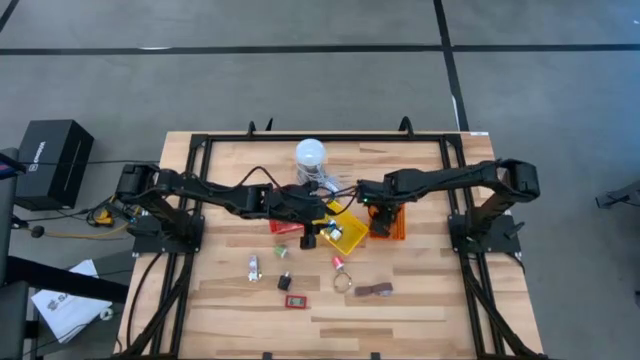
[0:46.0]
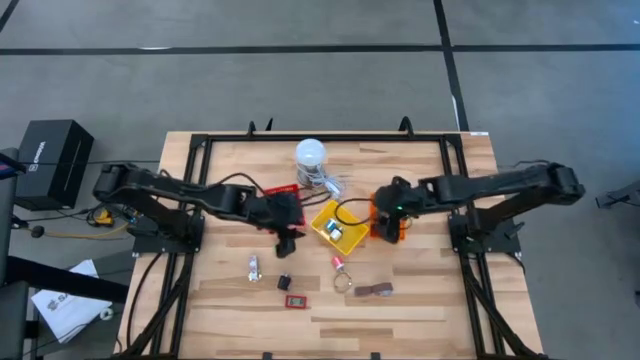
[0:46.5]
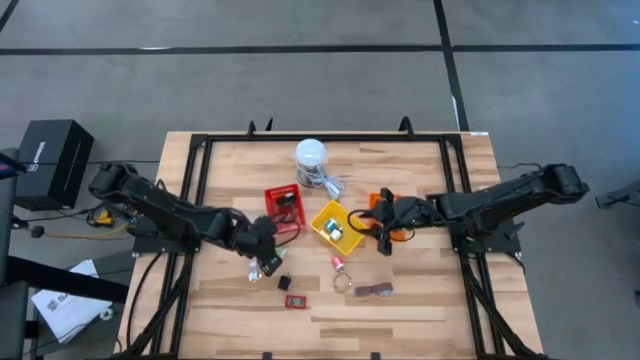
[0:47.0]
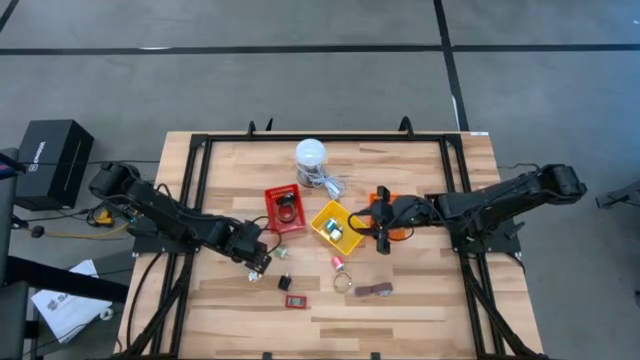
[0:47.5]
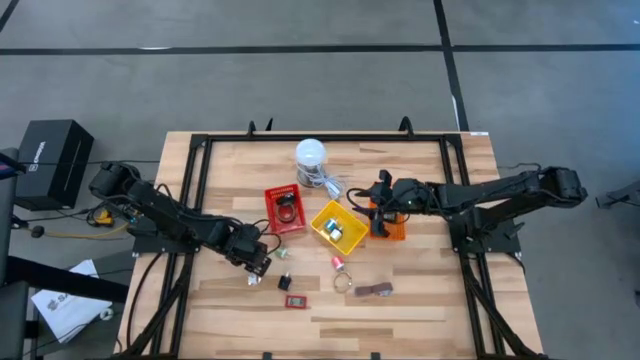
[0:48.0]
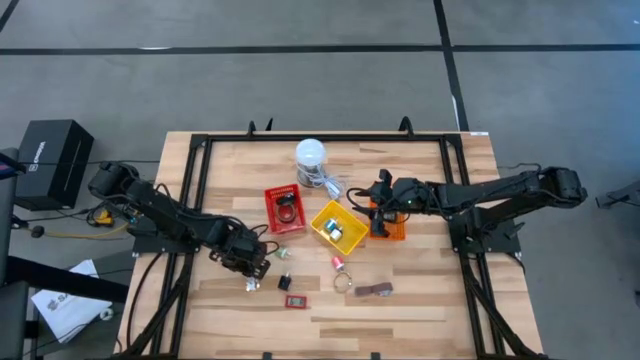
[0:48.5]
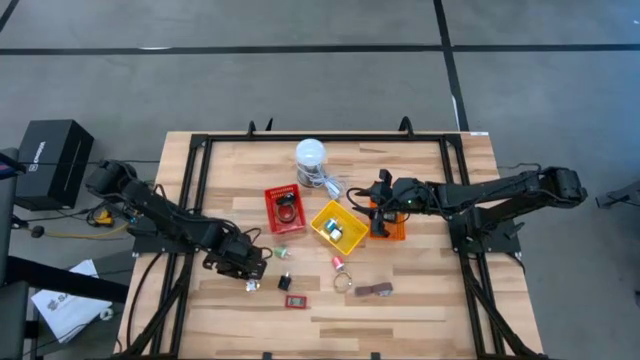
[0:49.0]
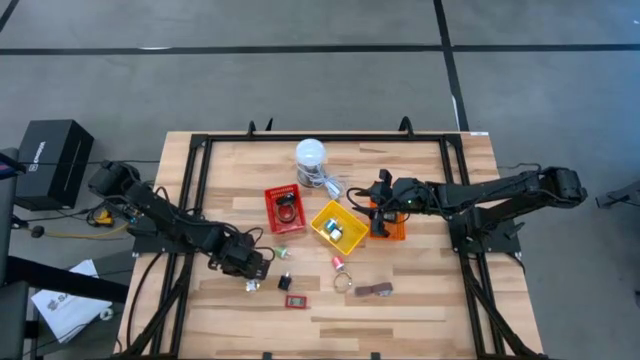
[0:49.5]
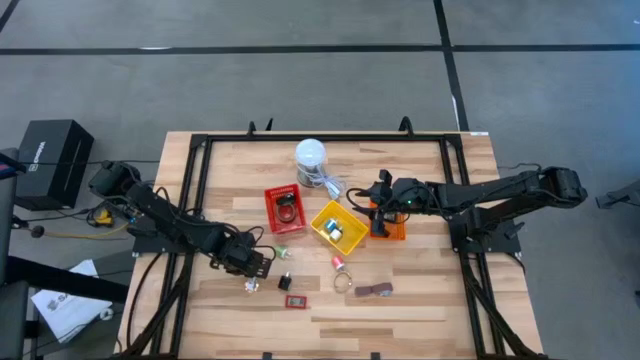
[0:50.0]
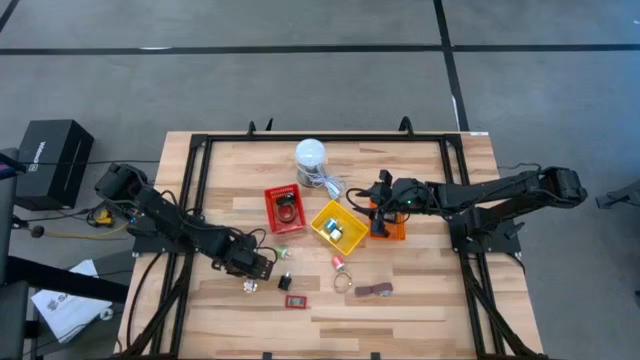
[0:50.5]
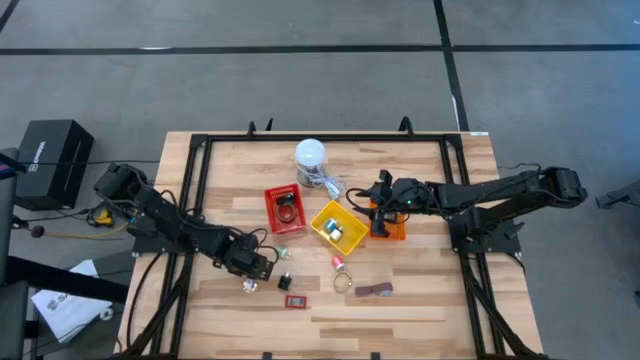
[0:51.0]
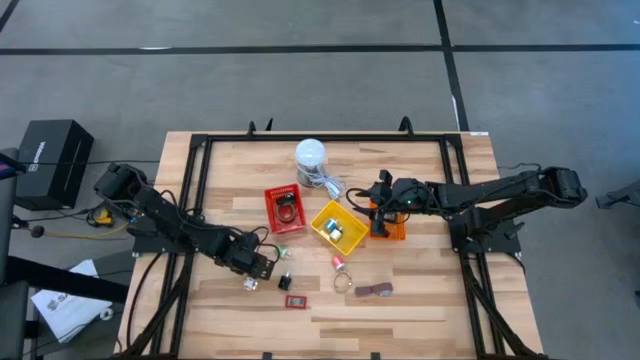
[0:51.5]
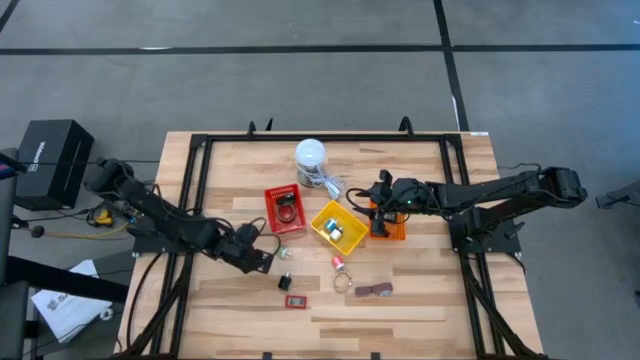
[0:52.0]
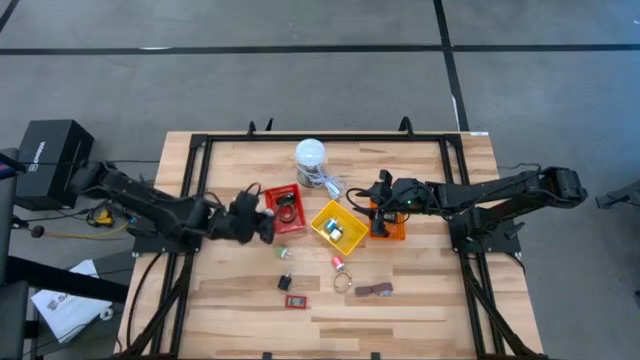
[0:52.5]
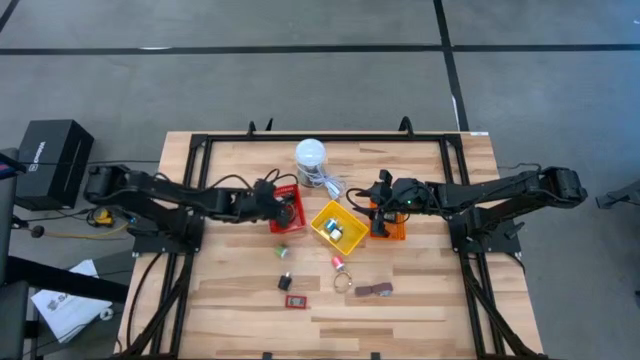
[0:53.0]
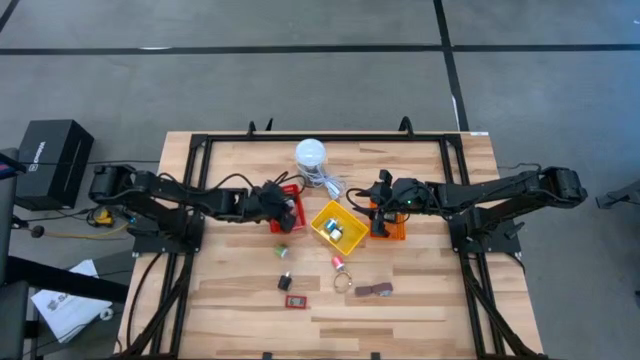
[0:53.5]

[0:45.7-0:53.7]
Task: Pick & Place Office items
Put the white watch into the red basket

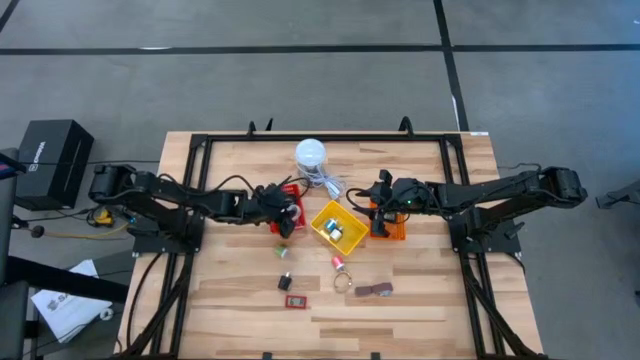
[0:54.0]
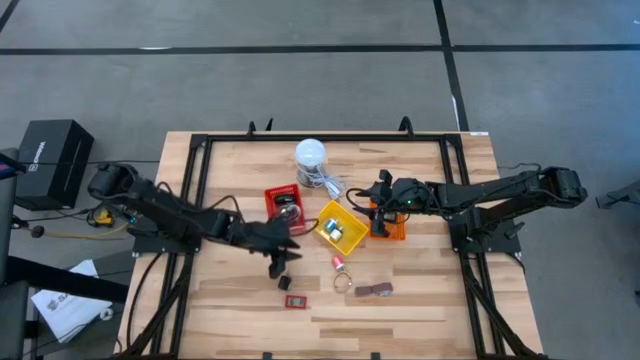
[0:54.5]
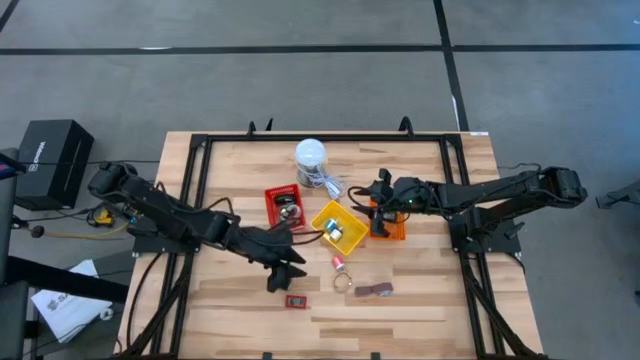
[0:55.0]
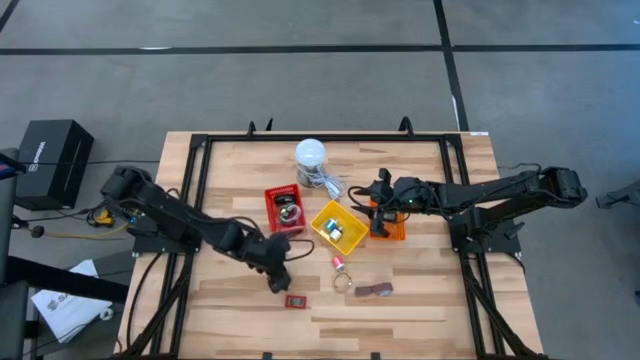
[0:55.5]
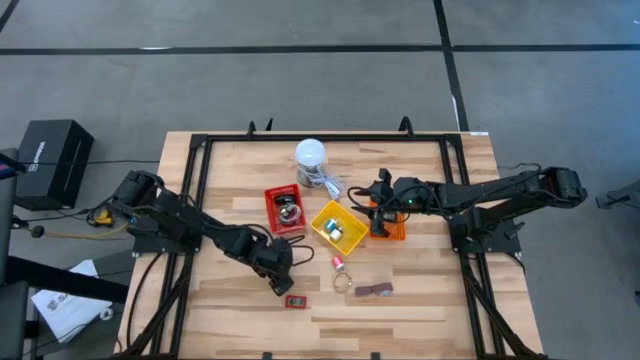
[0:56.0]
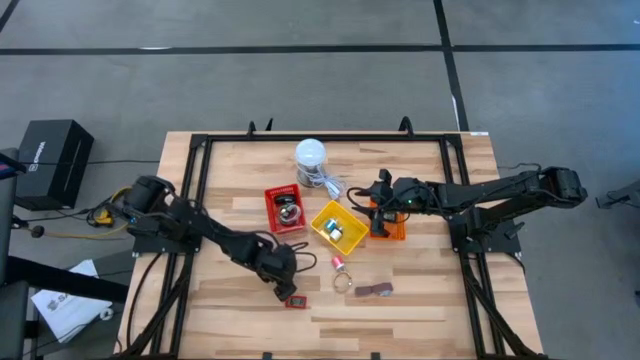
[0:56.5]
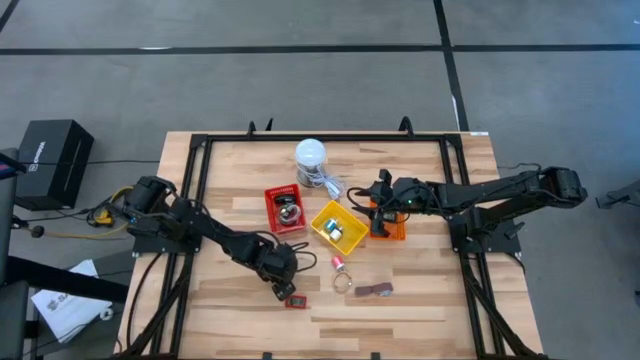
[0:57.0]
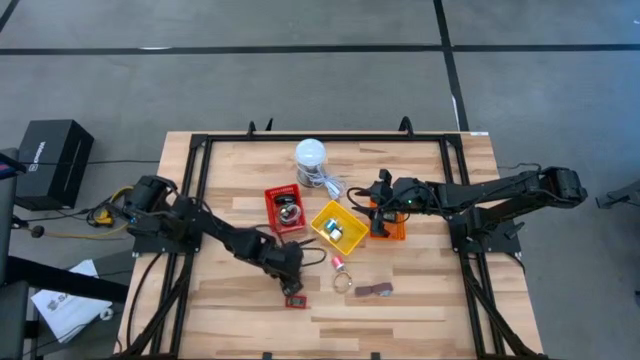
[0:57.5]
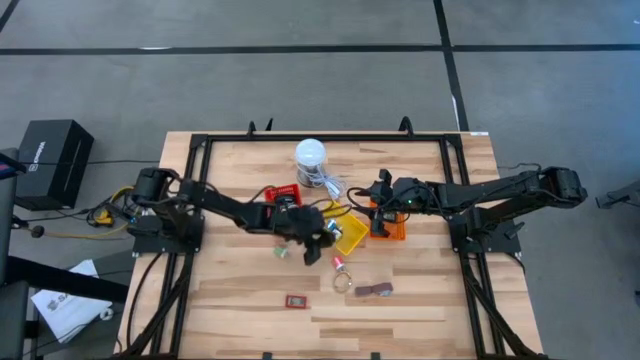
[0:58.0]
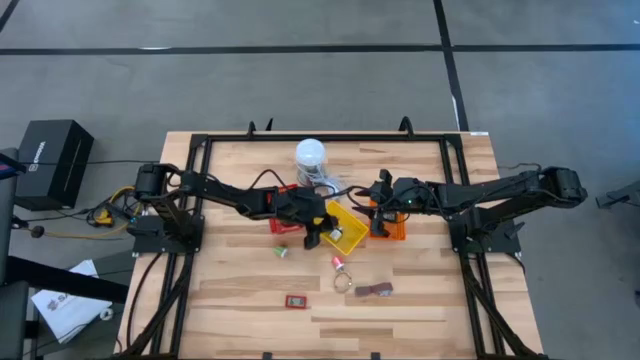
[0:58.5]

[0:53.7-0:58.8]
Put the black charger adapter into the yellow basket

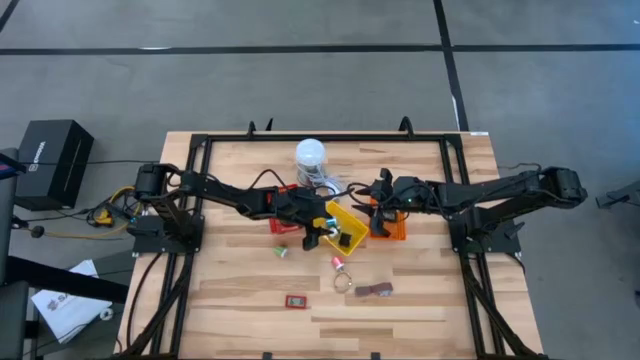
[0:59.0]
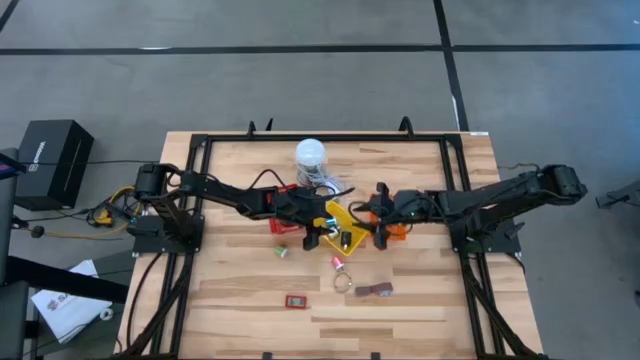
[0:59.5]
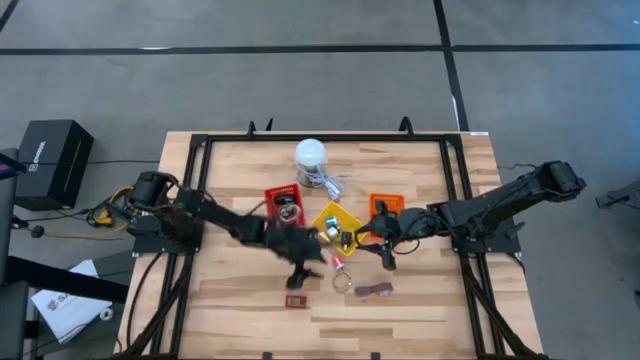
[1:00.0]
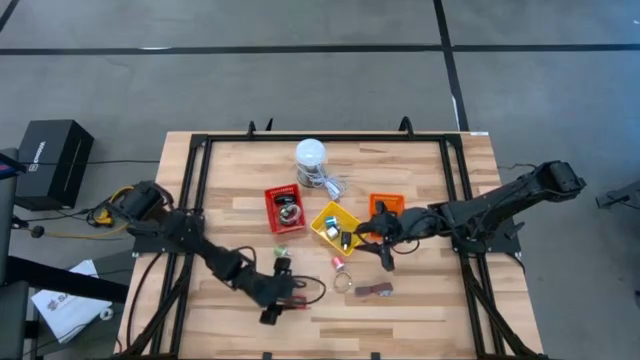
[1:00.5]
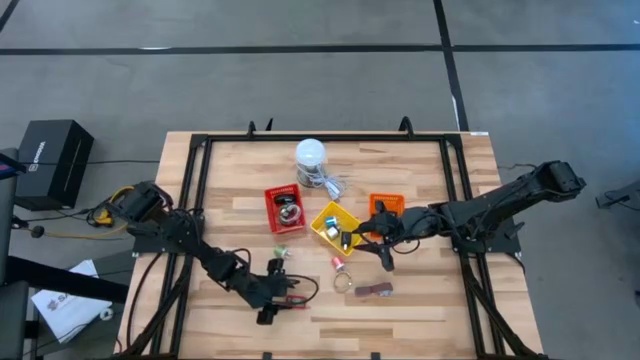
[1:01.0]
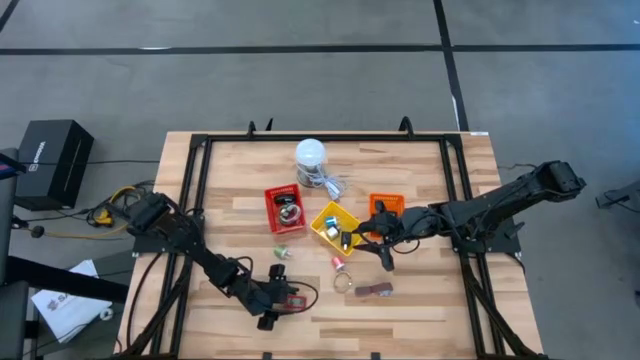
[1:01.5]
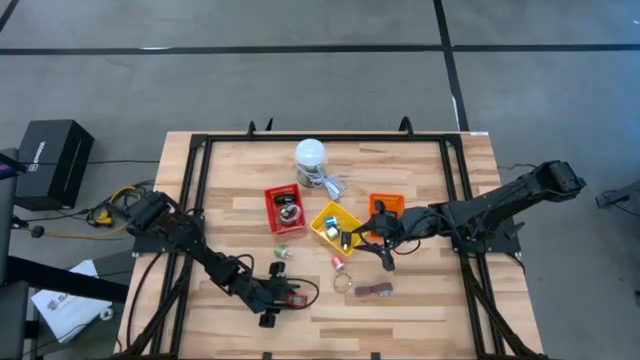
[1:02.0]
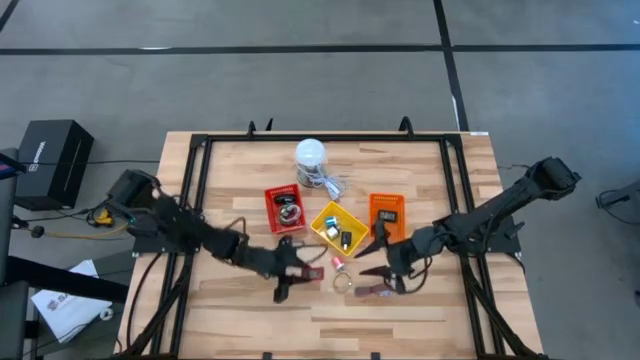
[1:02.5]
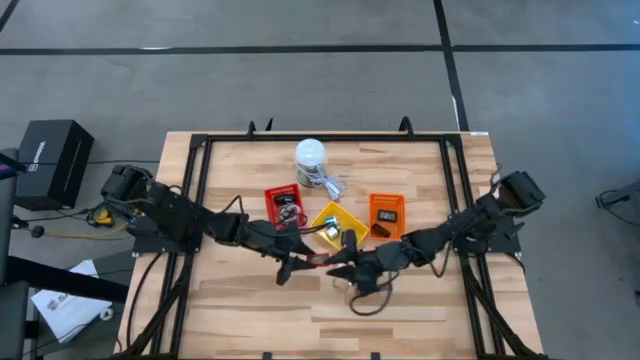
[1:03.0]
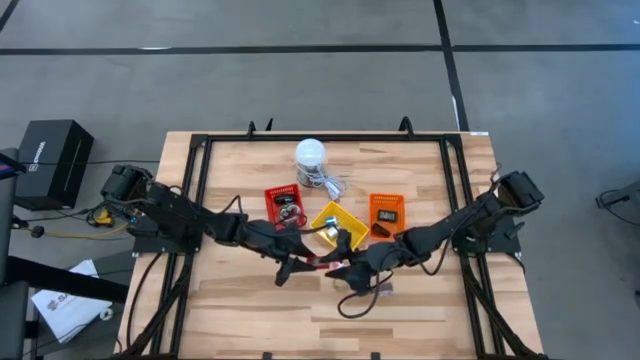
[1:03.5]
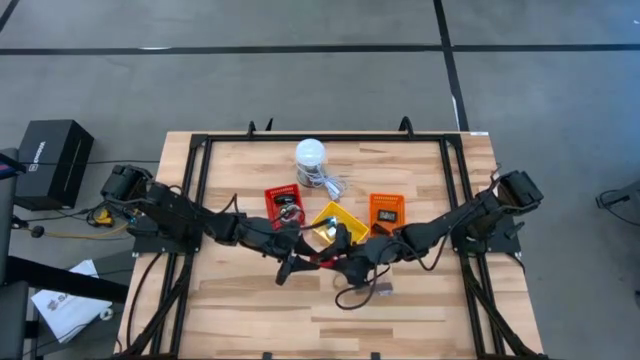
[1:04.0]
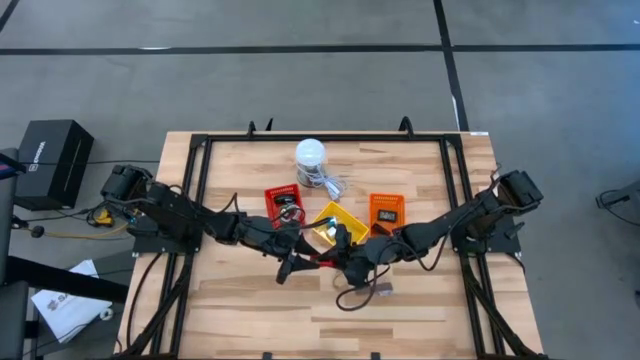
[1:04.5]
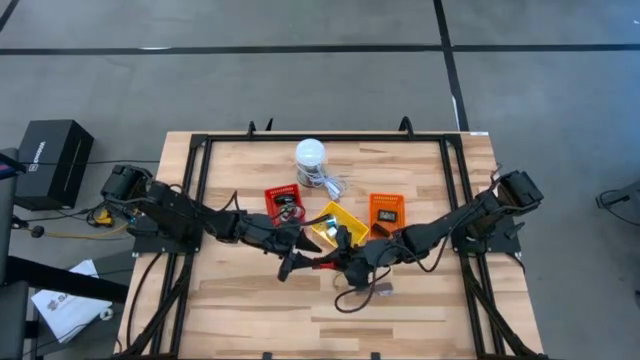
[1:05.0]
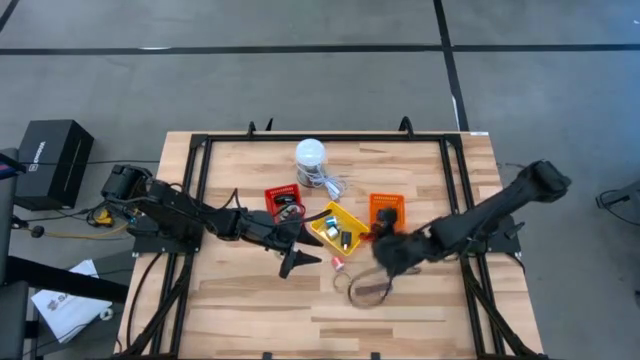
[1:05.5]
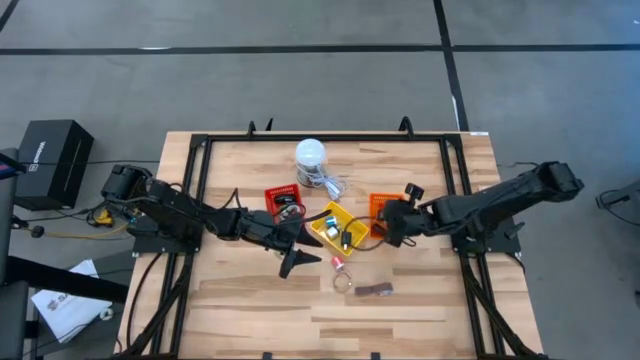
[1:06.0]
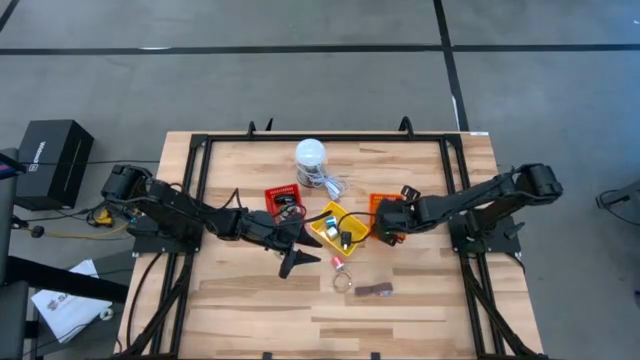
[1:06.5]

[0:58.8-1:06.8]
Put the red digital clock into the orange basket
